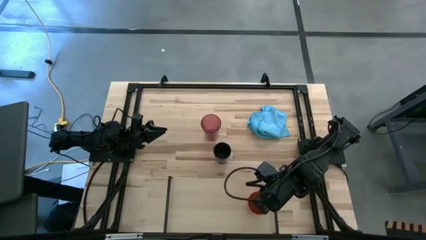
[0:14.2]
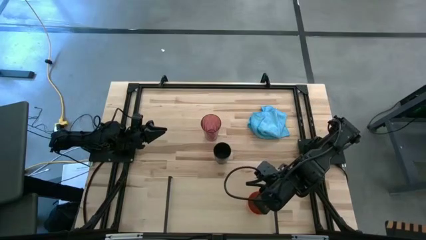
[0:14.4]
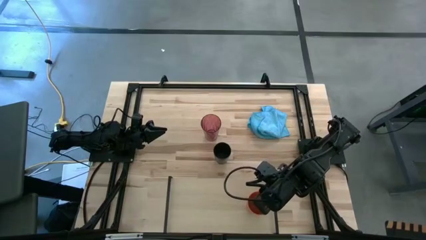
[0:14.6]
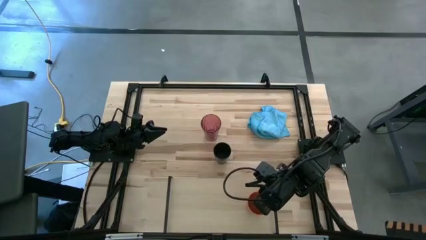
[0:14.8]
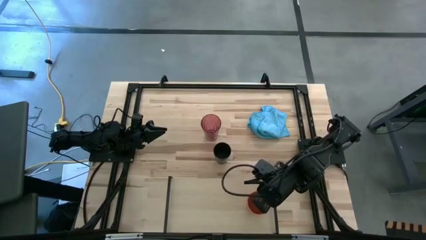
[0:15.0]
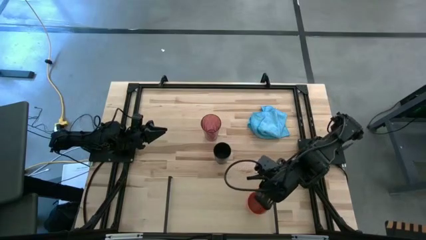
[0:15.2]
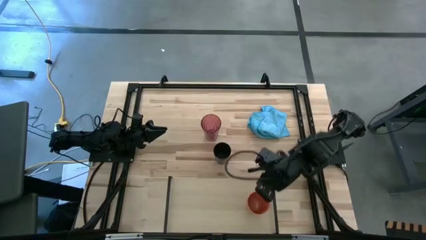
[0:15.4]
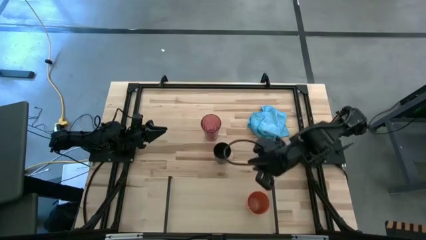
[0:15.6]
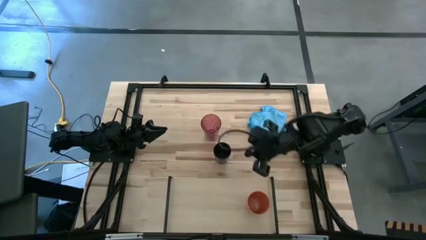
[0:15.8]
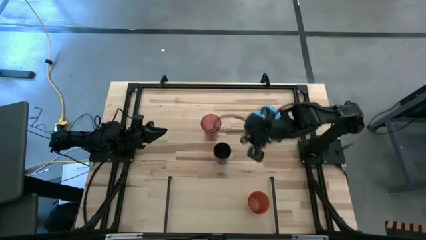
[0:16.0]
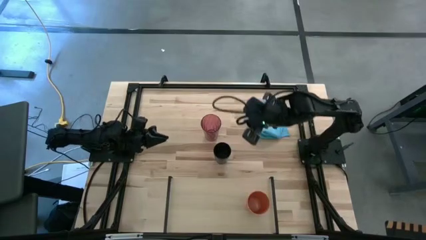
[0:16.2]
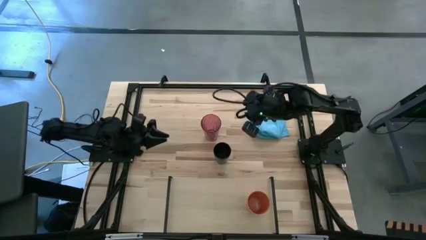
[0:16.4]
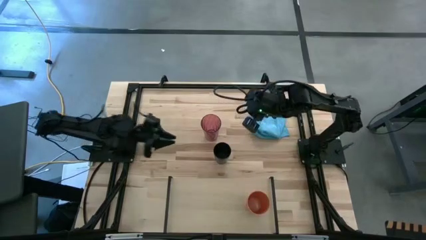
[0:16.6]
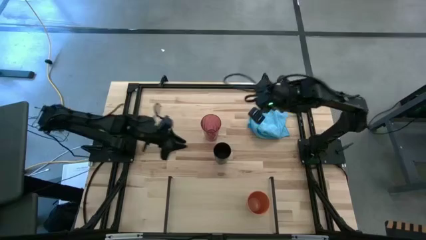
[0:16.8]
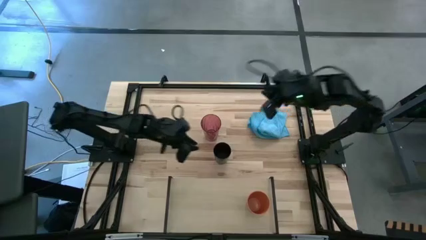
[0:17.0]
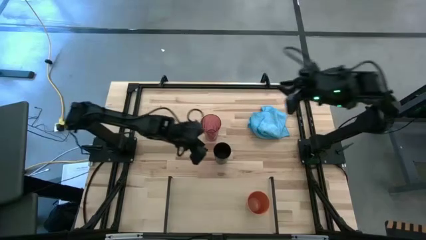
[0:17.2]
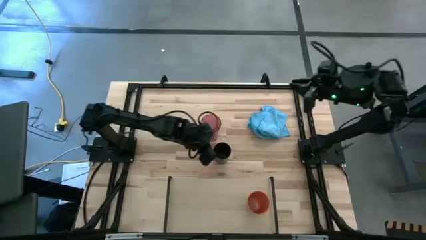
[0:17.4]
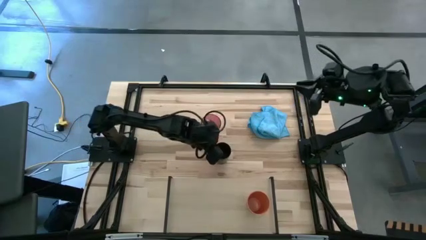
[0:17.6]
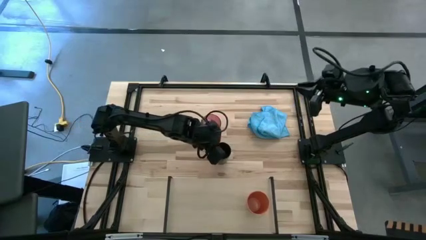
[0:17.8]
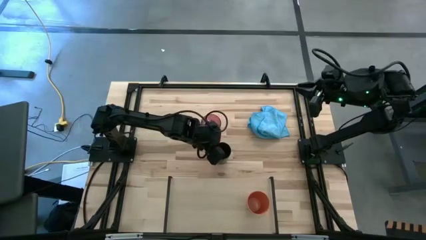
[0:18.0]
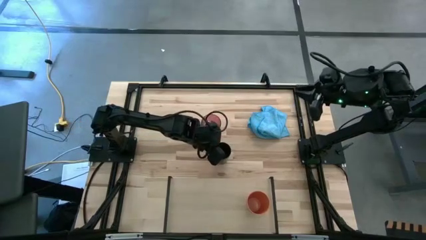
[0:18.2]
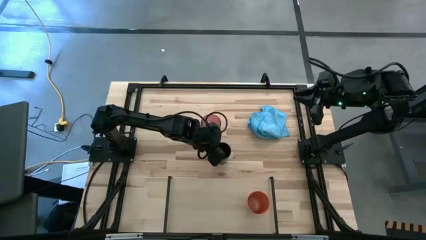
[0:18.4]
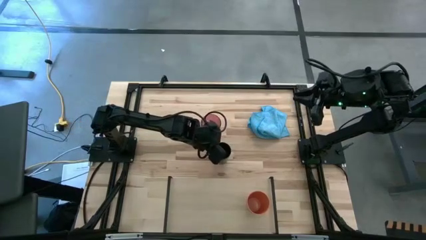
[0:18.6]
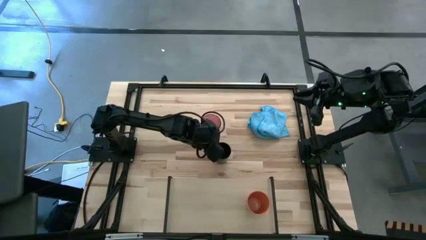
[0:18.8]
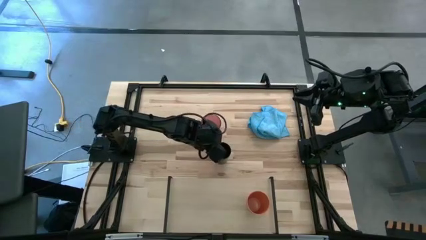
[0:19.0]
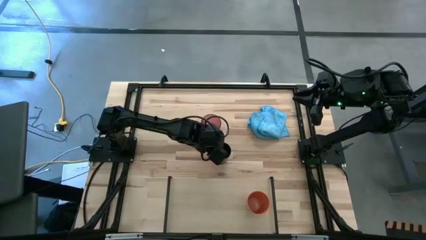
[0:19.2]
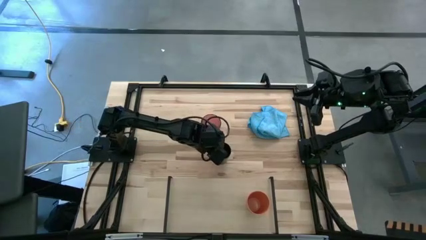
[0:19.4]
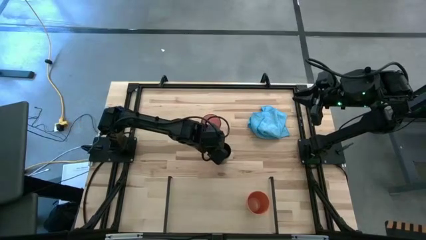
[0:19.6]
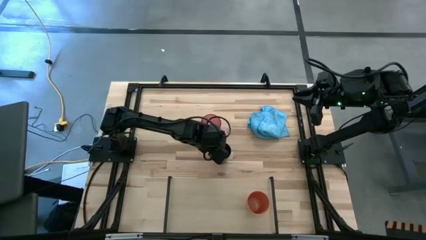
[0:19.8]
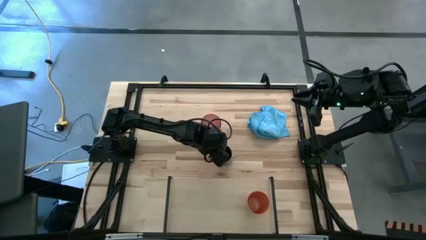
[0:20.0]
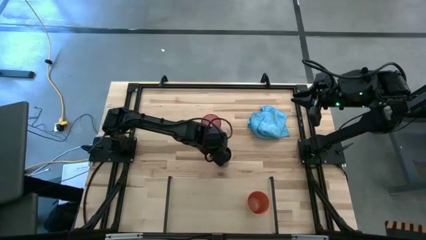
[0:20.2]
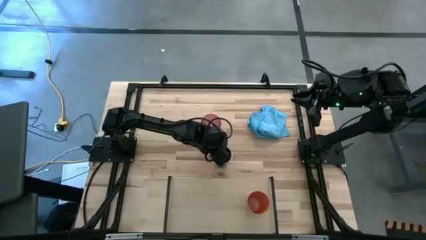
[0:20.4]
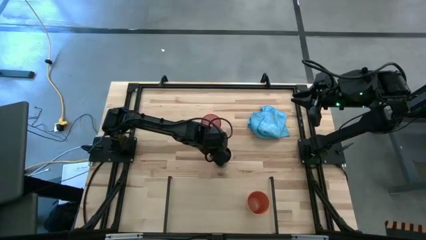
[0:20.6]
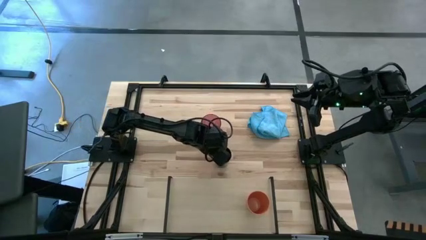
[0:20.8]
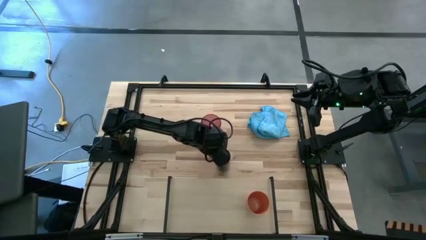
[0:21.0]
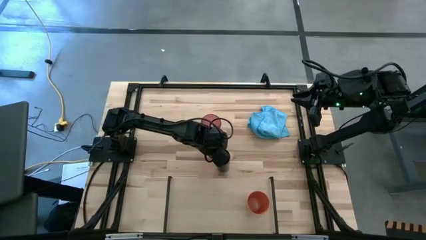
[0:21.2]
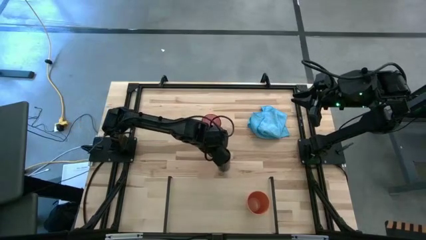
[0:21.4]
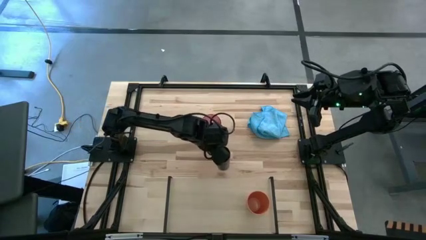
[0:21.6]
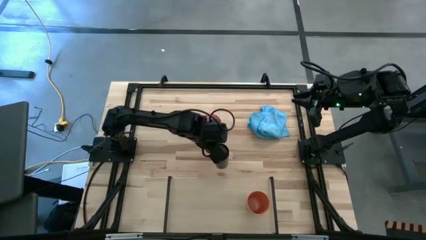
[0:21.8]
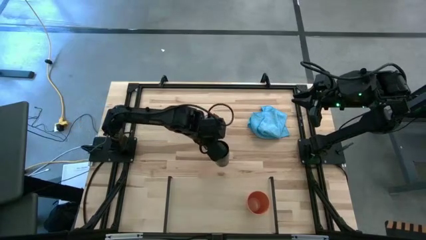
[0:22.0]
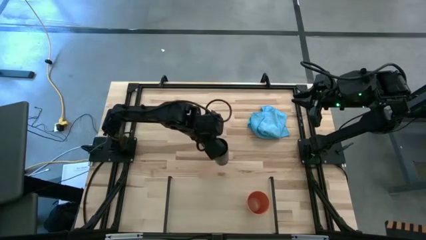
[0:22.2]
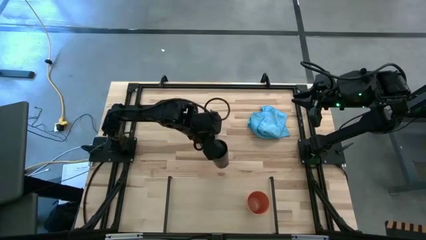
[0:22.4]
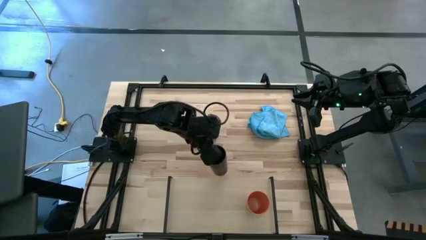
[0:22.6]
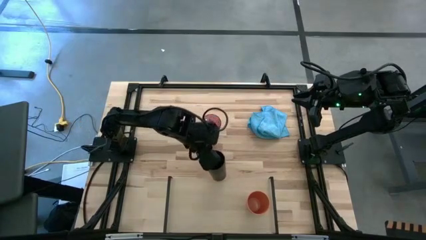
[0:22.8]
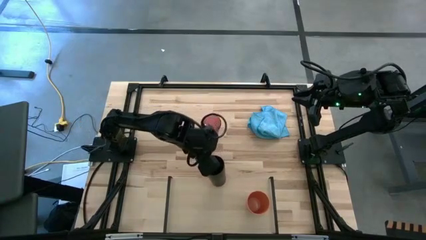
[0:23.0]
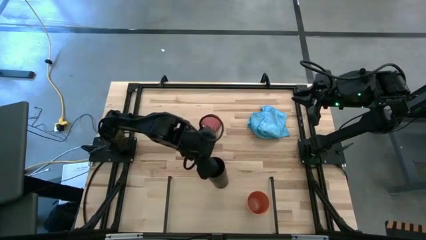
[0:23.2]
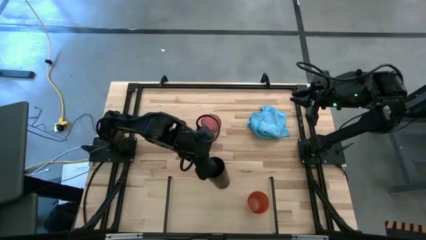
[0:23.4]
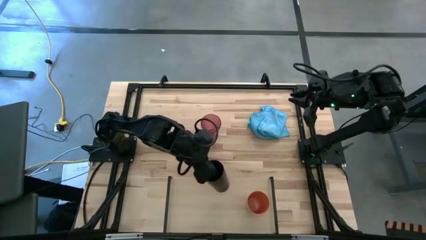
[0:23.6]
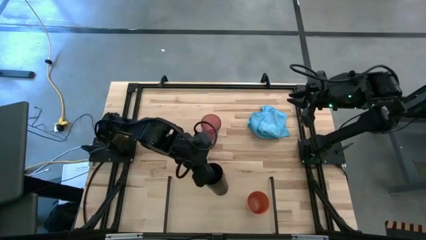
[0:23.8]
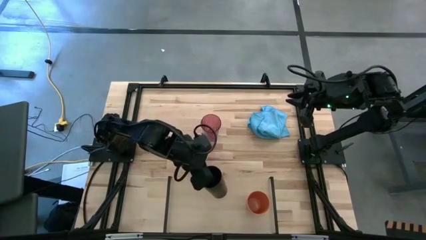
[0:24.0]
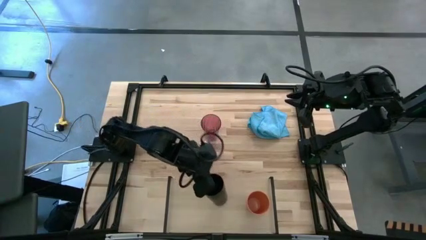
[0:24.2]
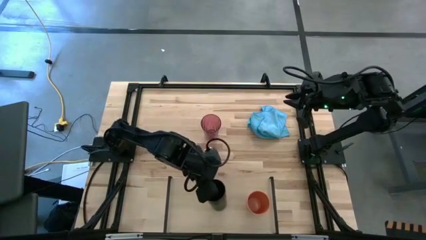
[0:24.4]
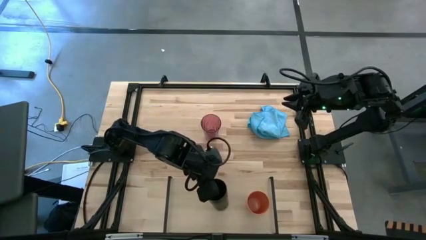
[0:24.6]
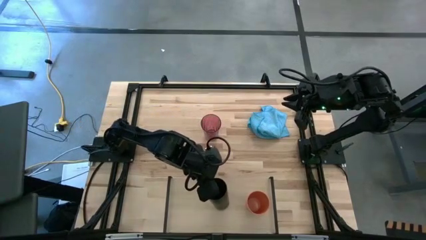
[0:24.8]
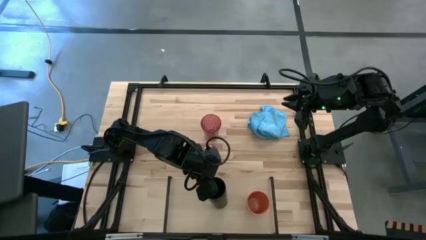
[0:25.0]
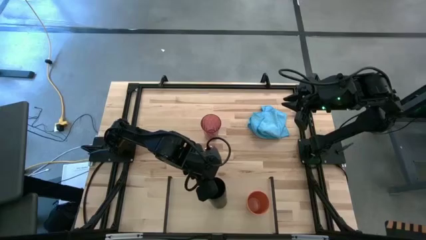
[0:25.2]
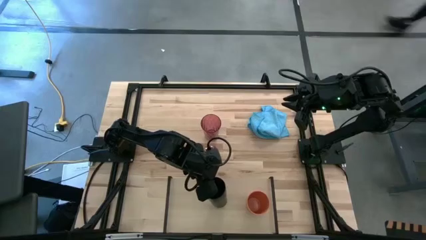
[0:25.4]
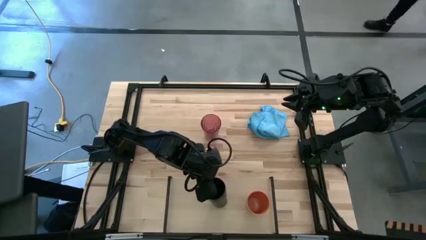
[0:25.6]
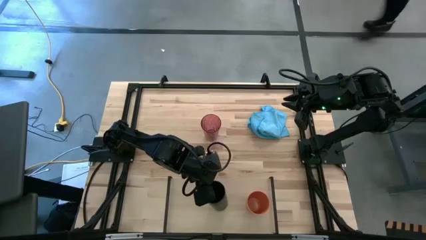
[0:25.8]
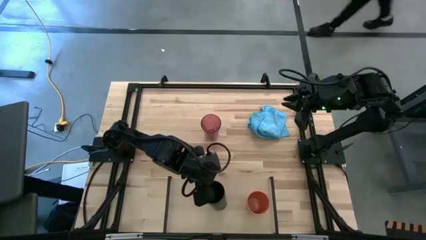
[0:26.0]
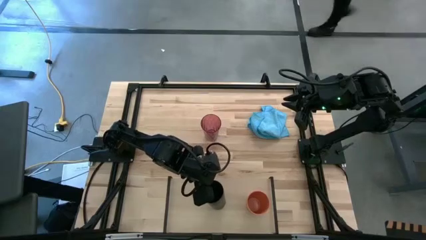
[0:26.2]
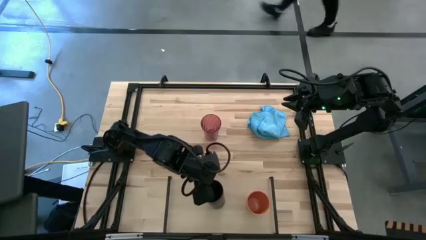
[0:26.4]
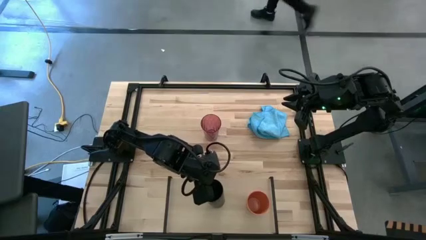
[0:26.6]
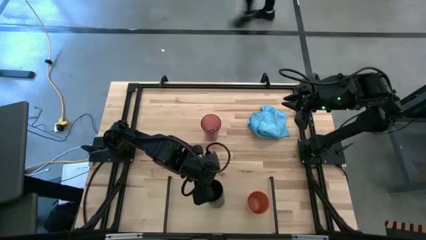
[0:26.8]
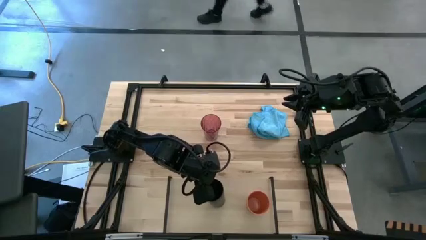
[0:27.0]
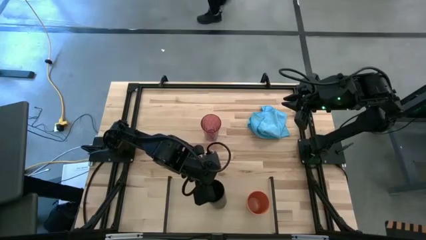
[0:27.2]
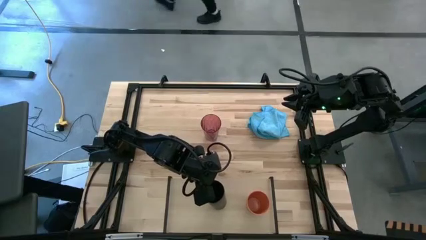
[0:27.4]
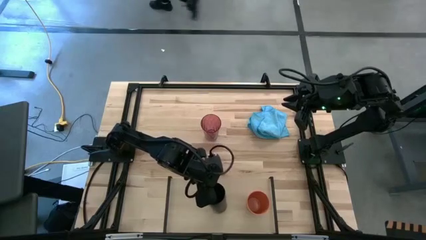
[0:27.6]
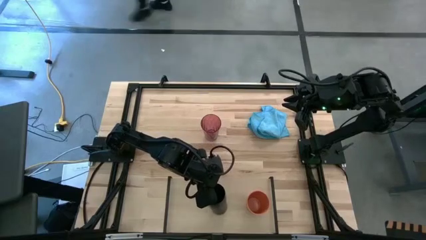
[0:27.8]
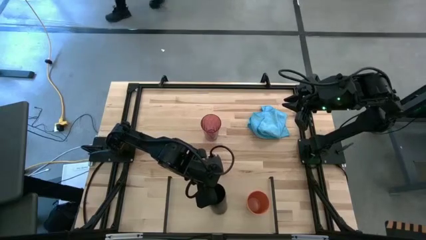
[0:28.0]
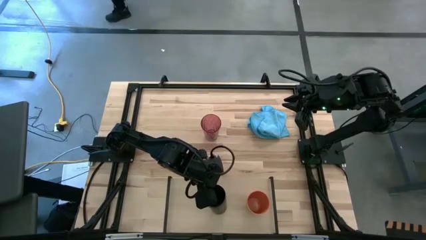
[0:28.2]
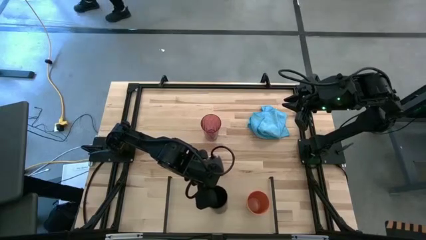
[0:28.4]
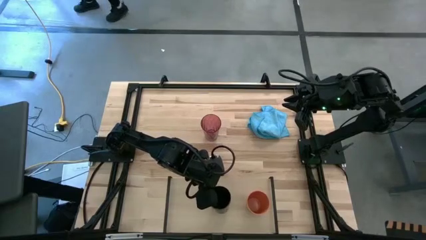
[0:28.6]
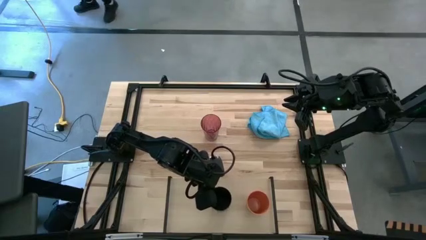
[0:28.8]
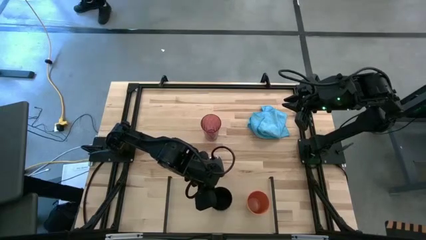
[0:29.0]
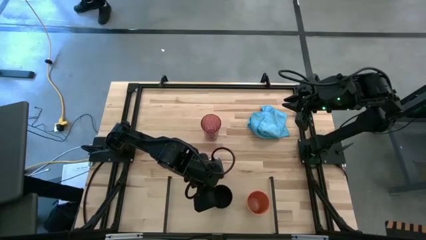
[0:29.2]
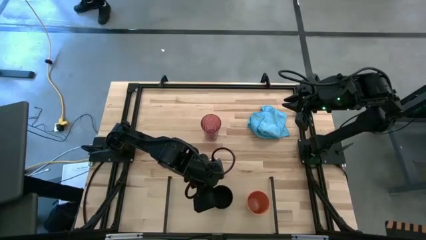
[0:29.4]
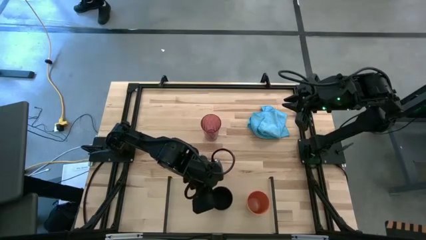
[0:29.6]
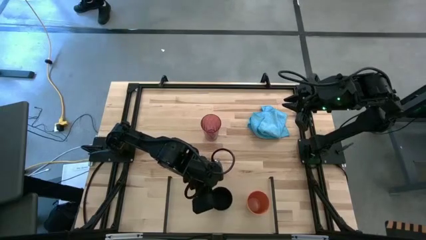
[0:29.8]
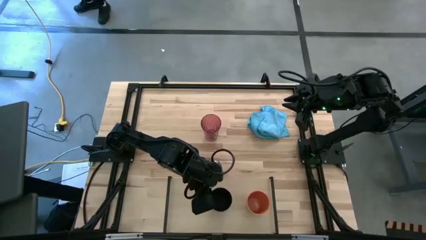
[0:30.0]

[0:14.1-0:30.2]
Task: Stack small to large cups/mugs on shelf
Put the black cup on the shelf
